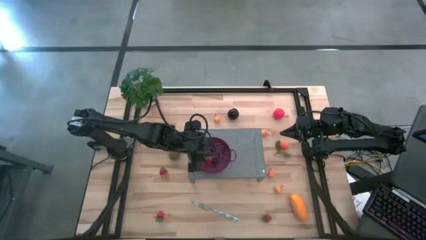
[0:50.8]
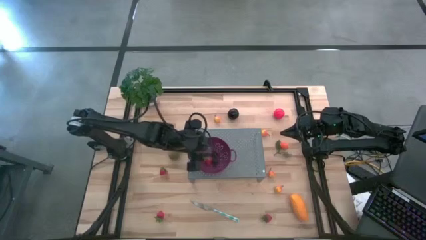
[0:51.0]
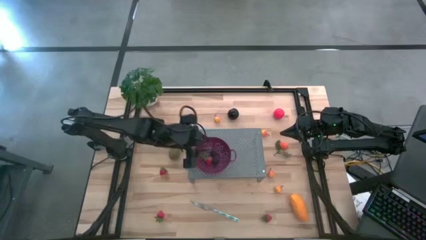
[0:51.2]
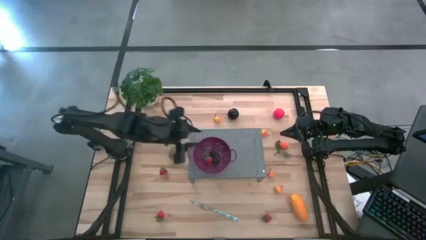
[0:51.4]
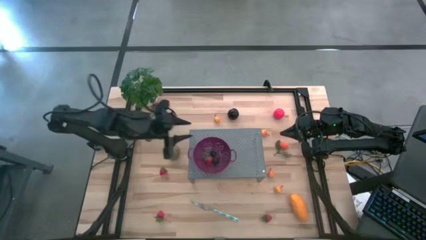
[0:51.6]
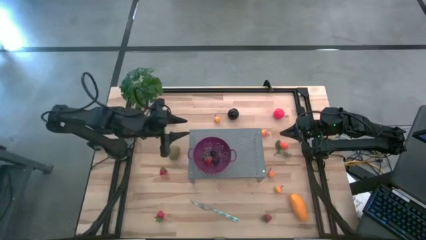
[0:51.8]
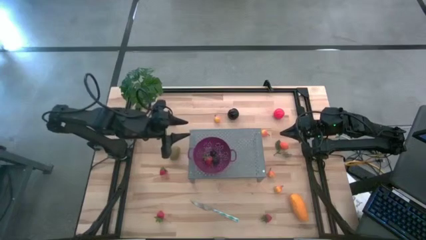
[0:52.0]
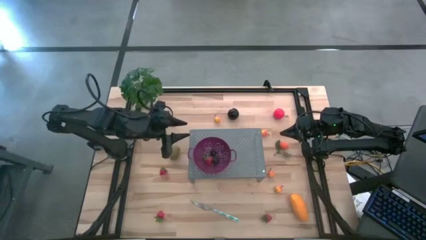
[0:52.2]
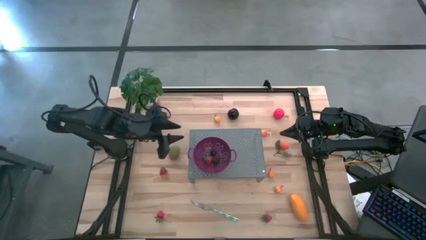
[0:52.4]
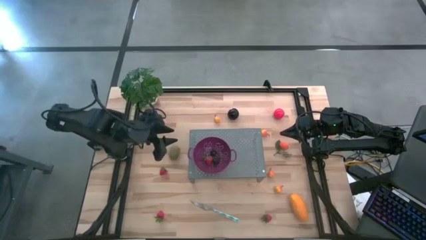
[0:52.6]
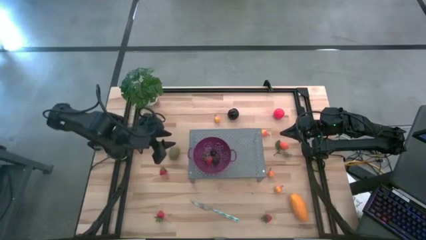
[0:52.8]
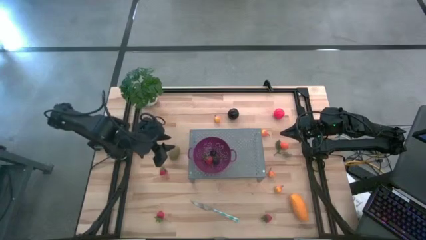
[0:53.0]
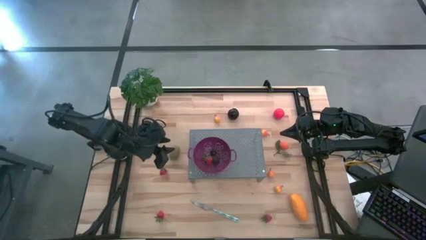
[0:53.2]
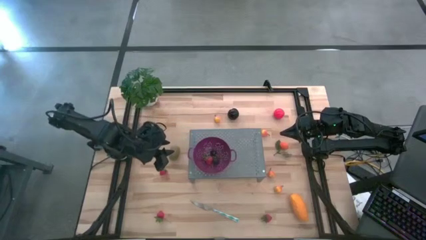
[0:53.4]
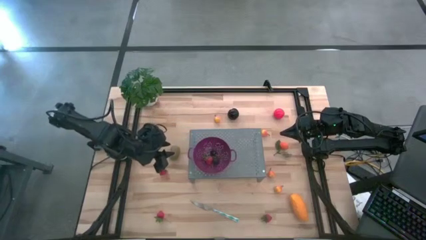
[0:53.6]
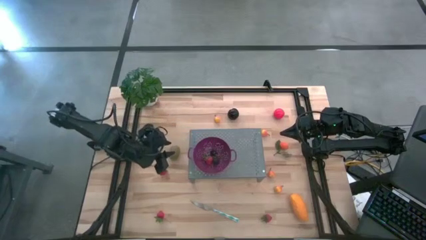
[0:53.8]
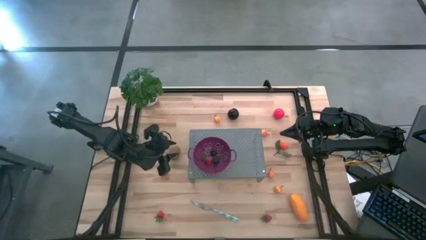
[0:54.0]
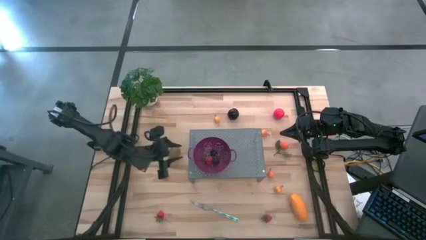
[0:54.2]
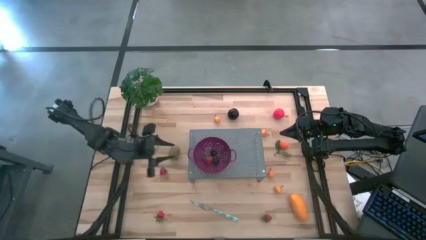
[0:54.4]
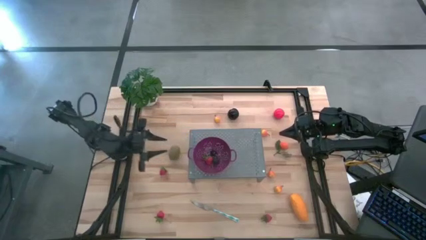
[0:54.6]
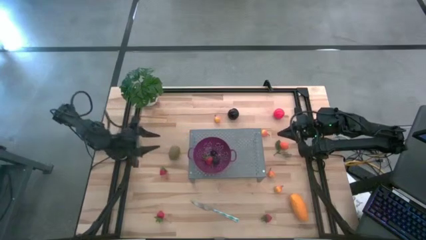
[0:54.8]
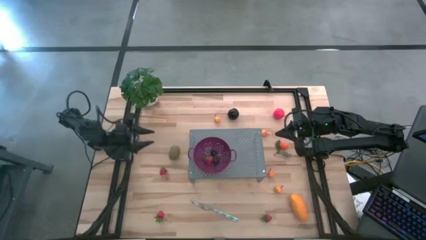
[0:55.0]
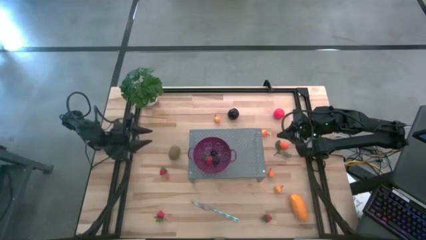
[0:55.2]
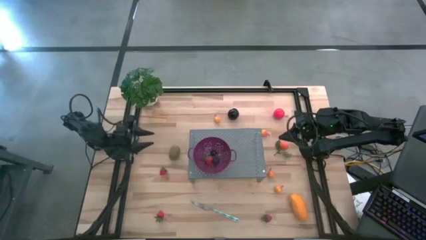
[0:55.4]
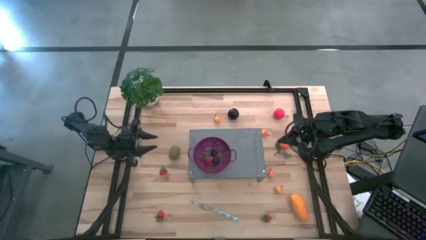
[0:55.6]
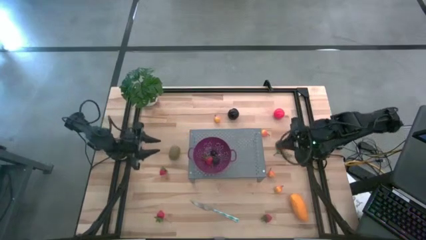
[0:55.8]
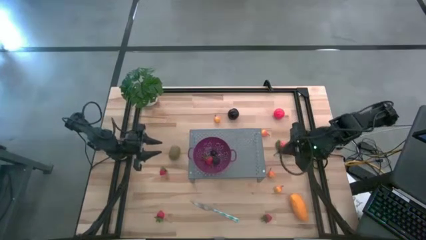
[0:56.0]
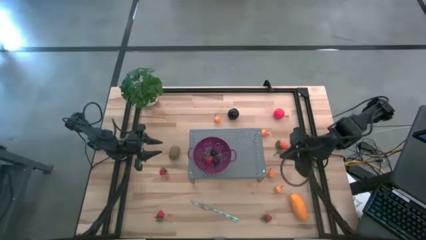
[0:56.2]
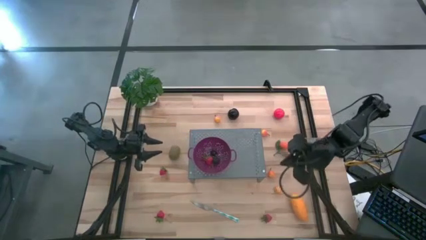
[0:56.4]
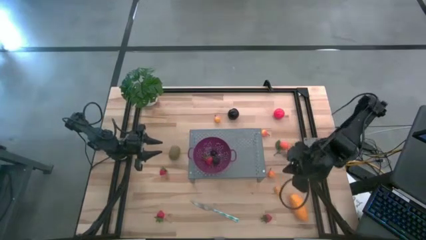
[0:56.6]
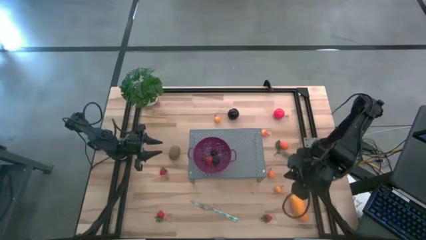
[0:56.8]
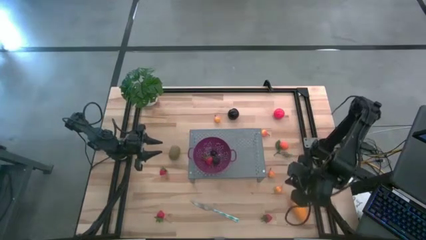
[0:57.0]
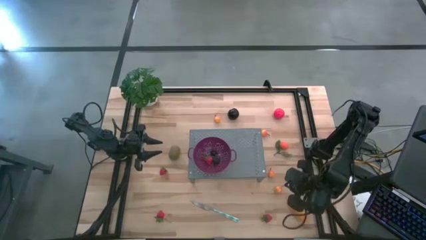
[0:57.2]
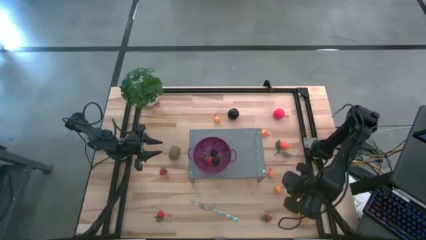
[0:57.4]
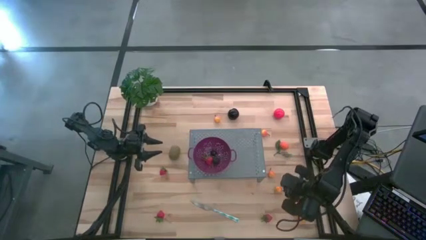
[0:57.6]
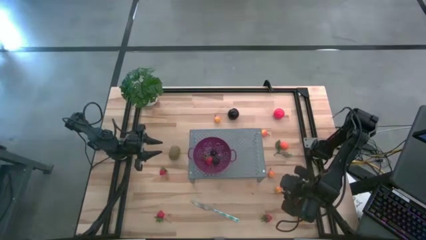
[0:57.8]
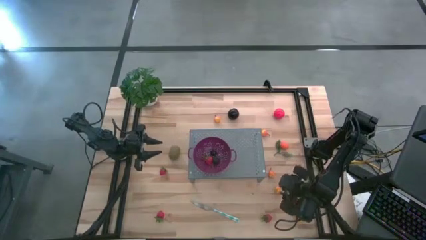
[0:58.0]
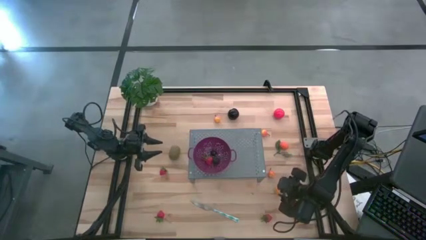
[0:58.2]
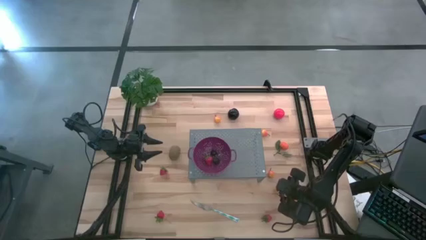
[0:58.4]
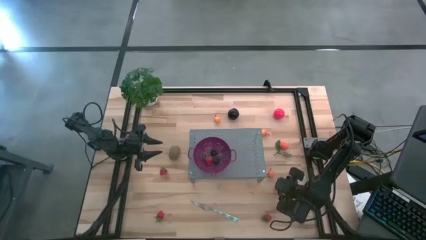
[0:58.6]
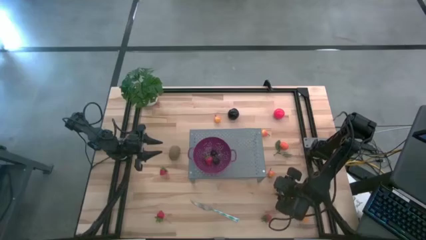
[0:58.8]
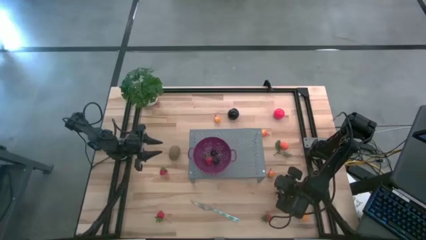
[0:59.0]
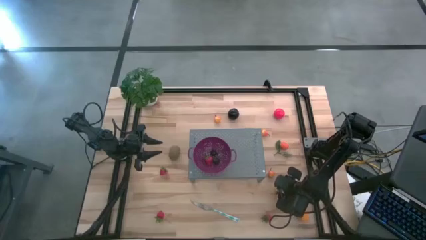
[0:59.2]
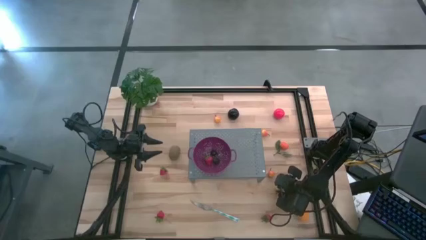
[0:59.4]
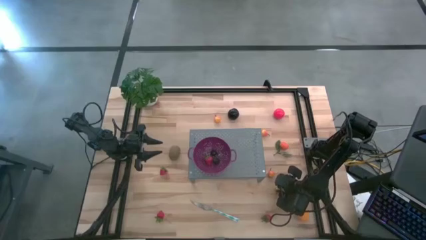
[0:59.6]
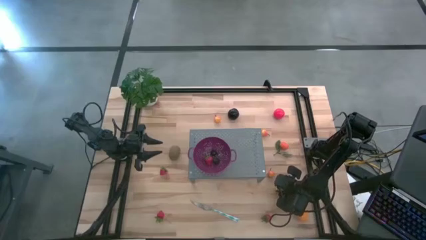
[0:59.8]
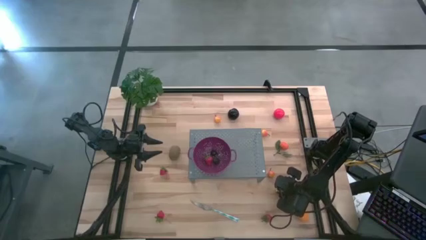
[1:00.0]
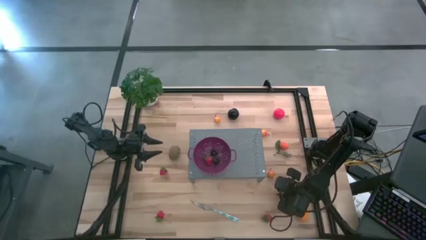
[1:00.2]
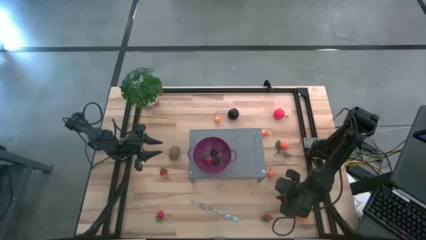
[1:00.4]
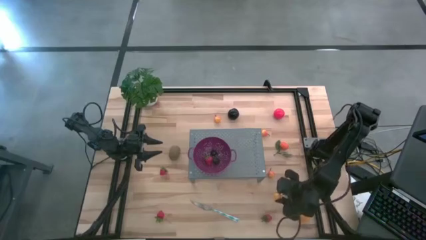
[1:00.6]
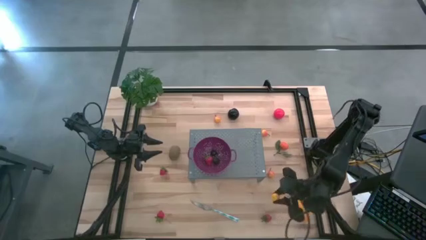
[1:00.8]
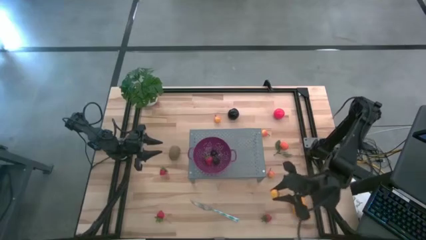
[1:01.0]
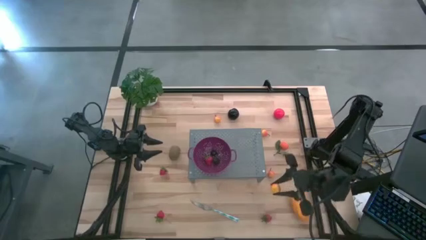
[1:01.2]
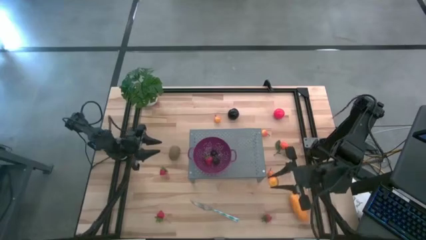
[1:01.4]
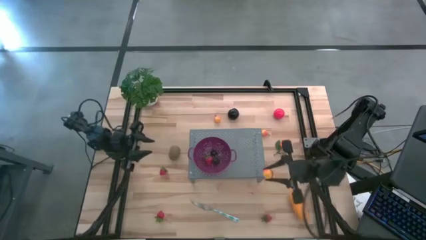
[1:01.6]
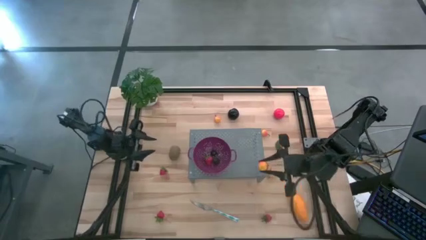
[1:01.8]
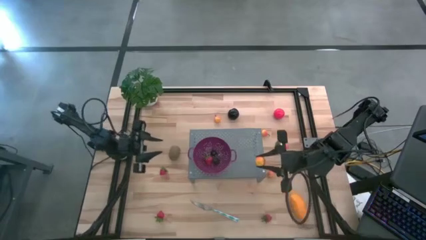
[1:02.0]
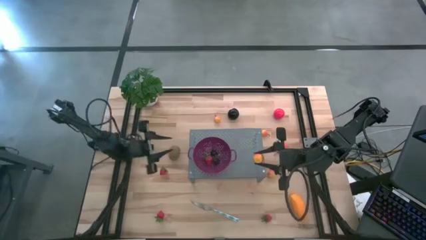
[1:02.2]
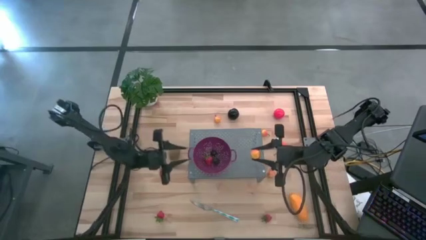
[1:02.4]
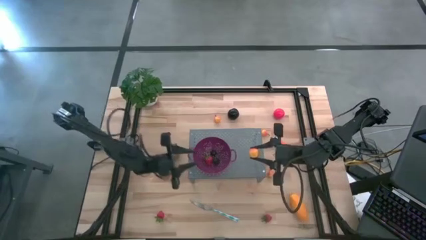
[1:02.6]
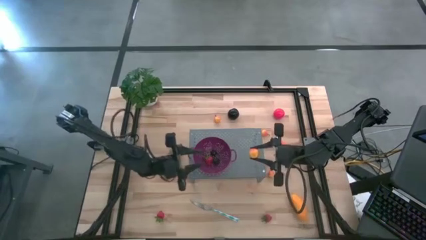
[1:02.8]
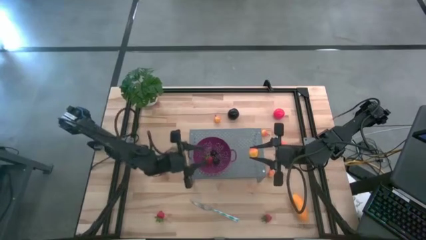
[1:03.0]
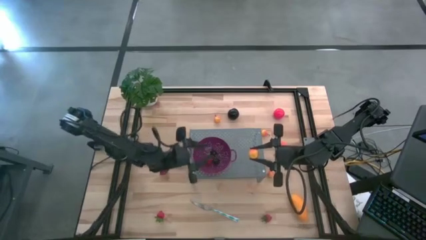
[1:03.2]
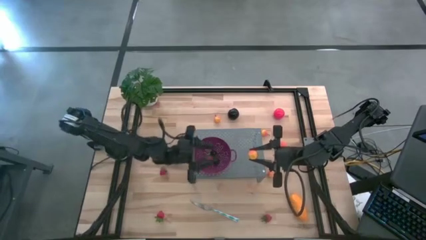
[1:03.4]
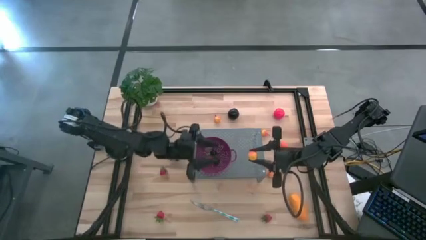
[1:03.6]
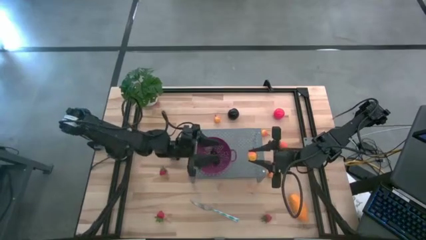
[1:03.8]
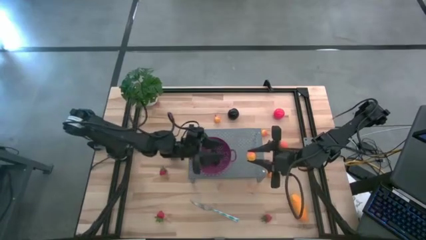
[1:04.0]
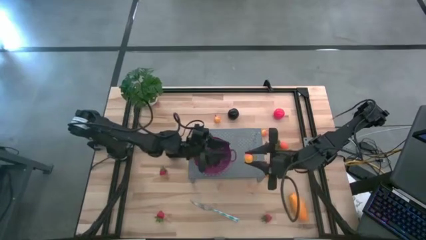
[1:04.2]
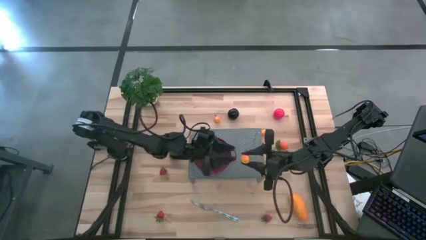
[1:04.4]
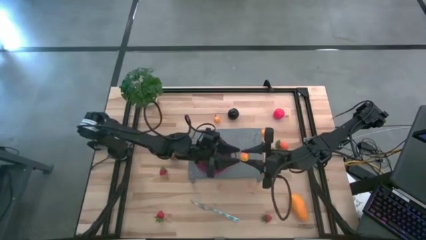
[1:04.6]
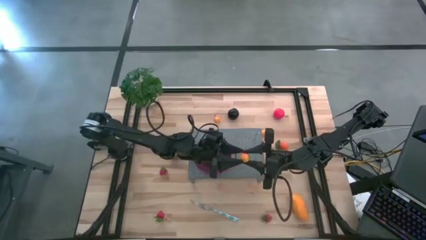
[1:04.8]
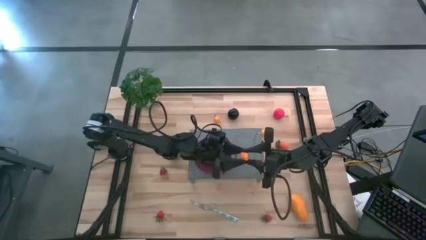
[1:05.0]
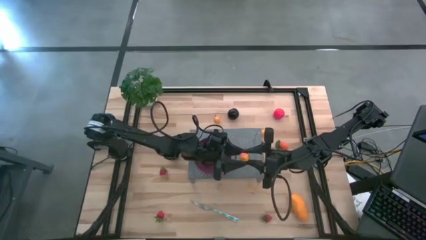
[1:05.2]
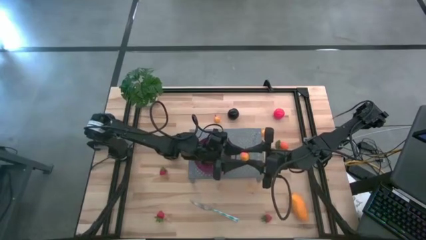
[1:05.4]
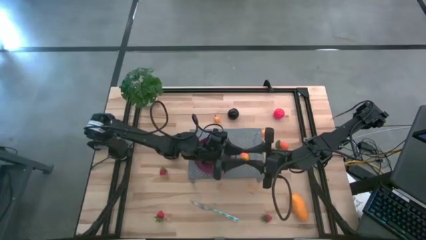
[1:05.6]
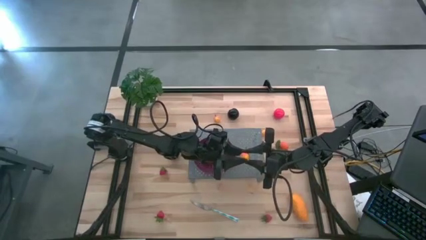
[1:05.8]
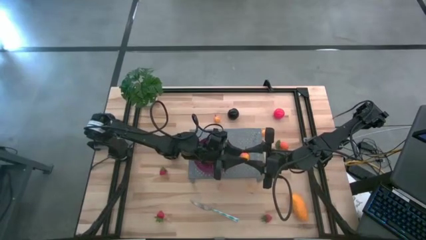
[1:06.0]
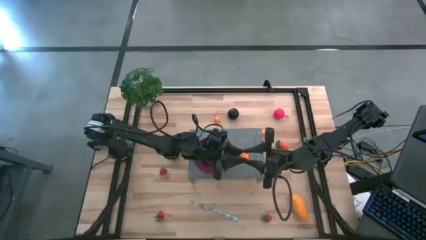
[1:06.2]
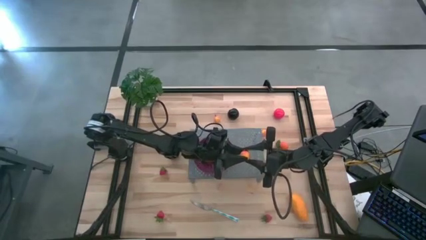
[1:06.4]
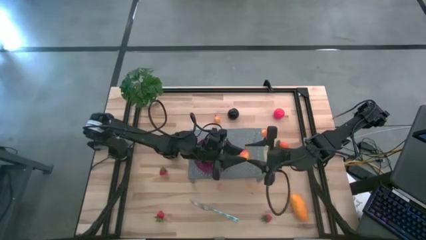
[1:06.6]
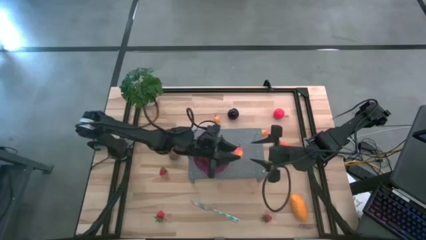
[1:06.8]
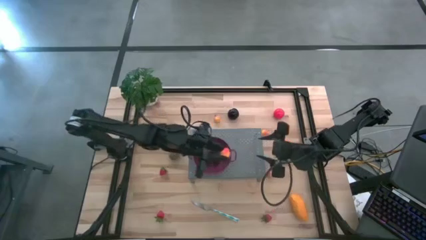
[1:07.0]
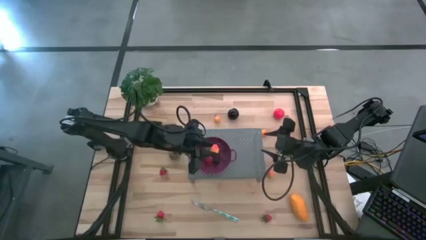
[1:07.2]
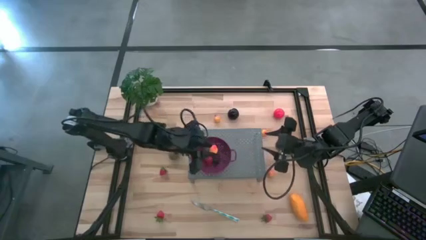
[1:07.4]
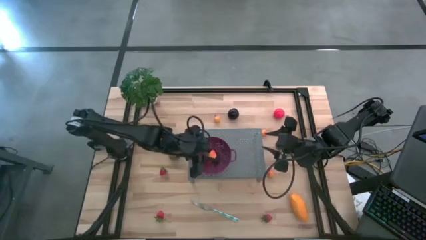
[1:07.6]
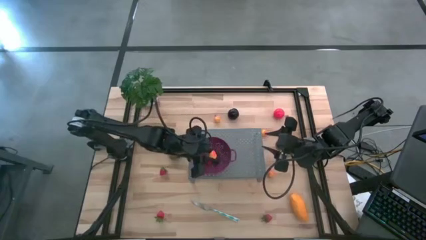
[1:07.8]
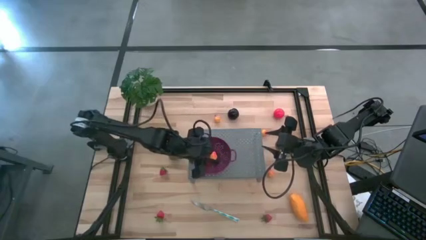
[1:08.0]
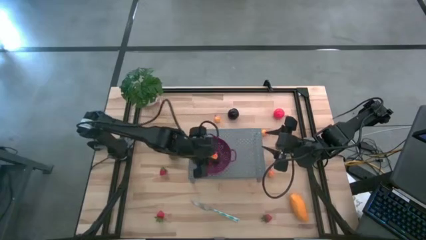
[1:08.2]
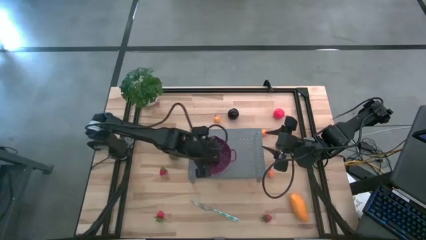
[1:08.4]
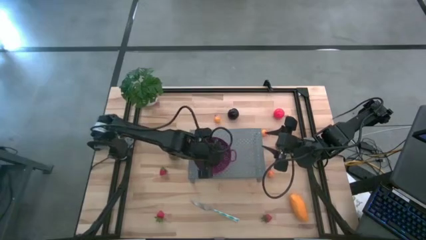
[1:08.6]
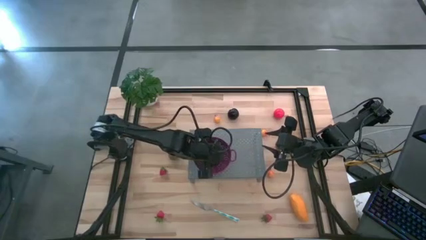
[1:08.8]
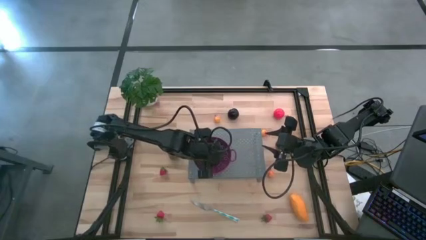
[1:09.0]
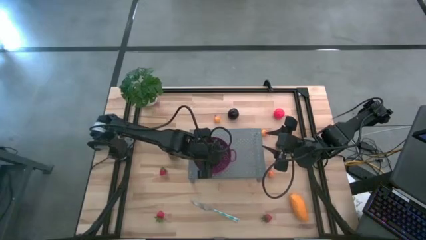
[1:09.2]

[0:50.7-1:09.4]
Task: Pick & Place Fruit
Put the pear into the purple strainer bowl
